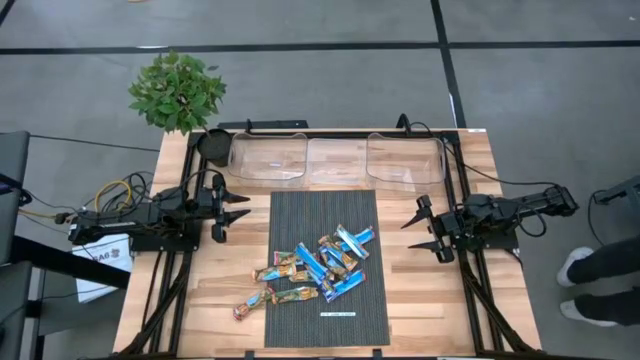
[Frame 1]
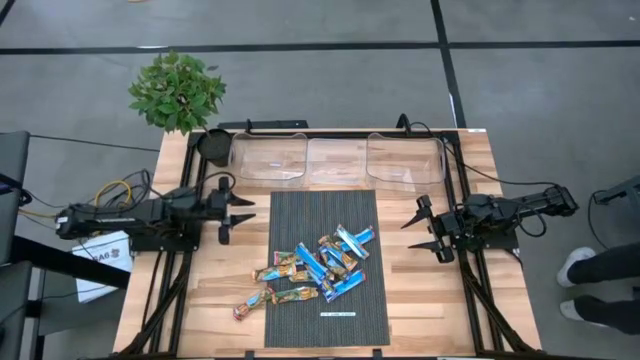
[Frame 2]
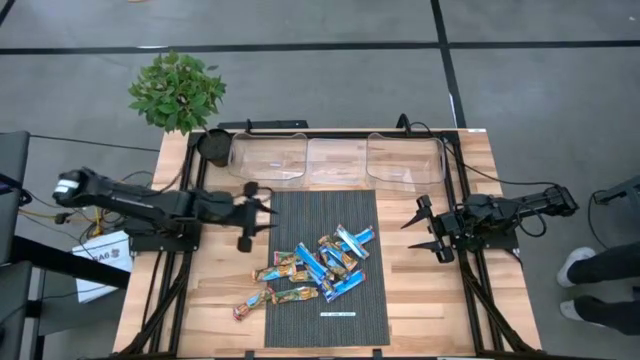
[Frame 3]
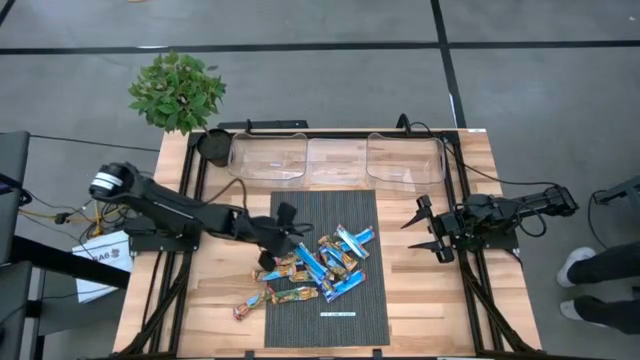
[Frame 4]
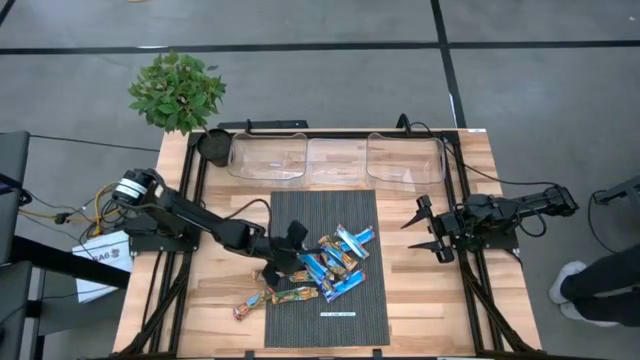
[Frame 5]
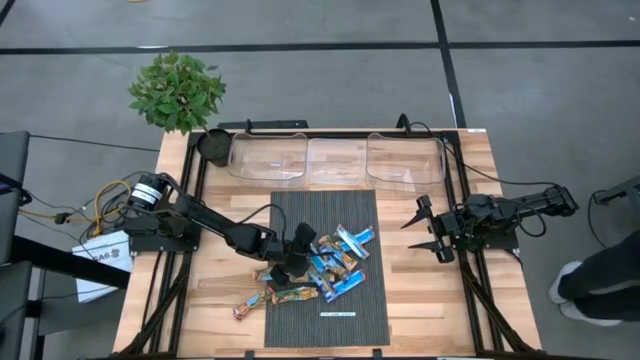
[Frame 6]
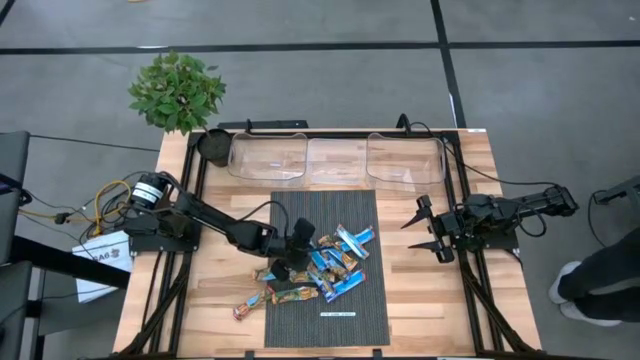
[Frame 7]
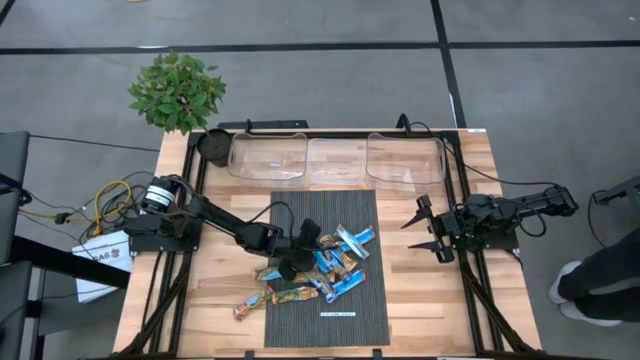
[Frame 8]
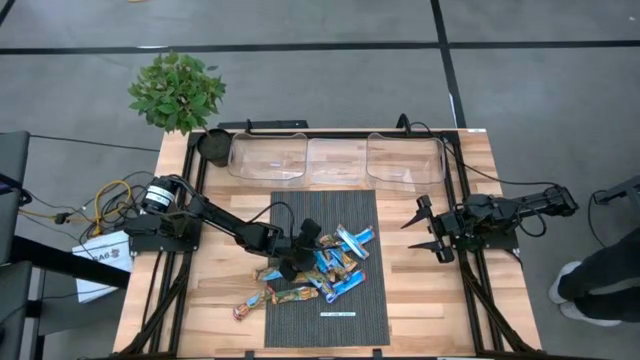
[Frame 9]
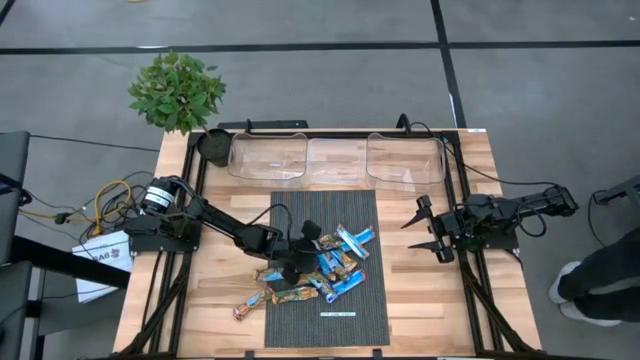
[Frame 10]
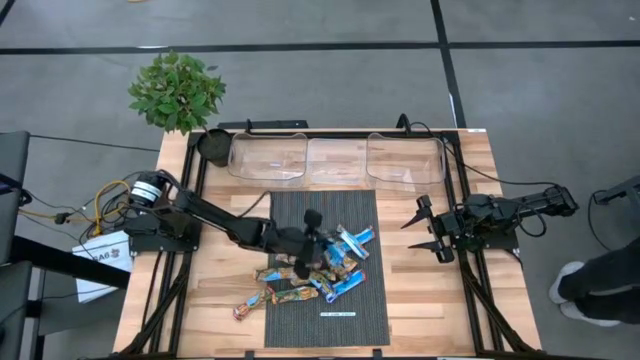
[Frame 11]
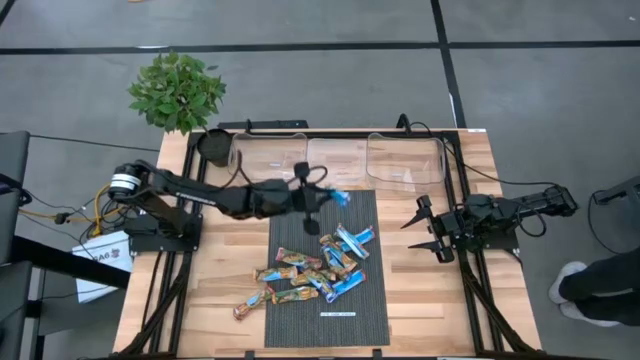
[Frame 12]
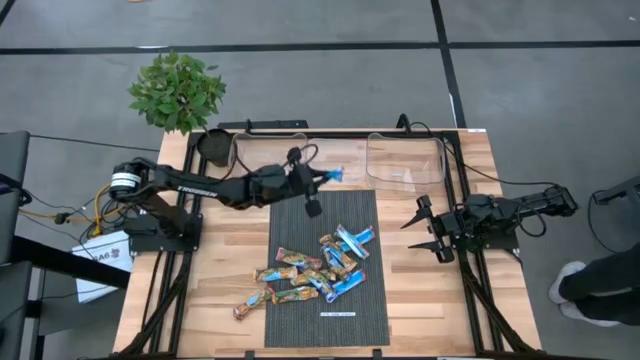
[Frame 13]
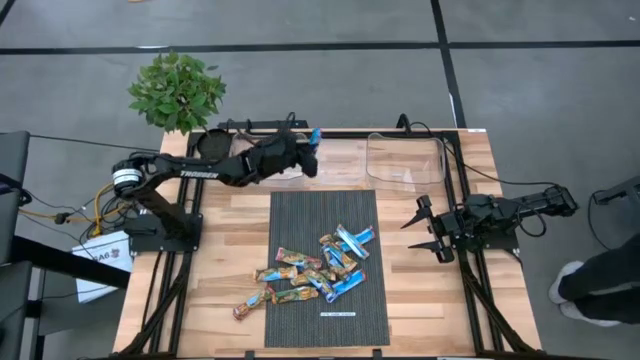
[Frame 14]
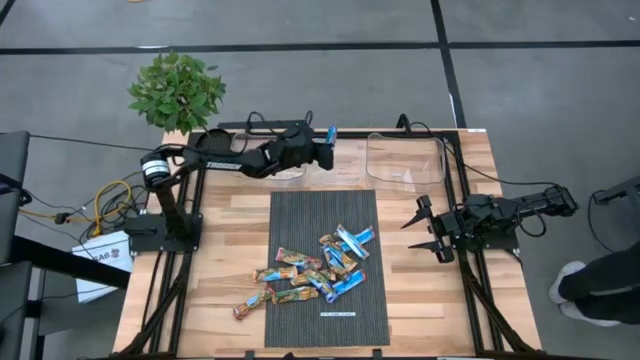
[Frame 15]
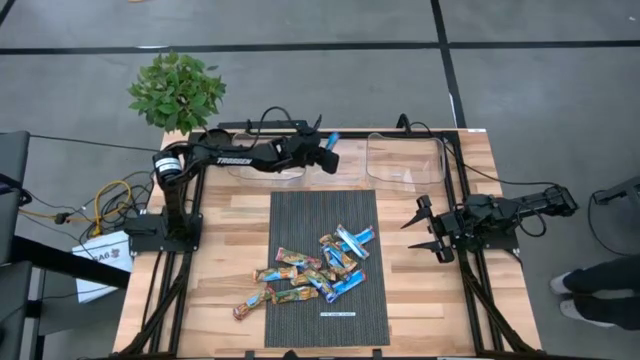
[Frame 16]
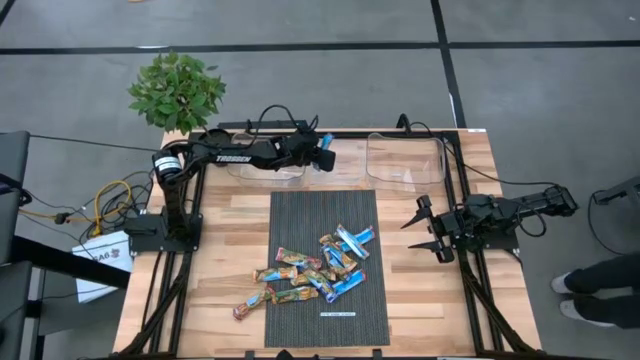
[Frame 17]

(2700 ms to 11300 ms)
Task: Pick and place Granola Bars by type
Put the blue granola bar into the white bin

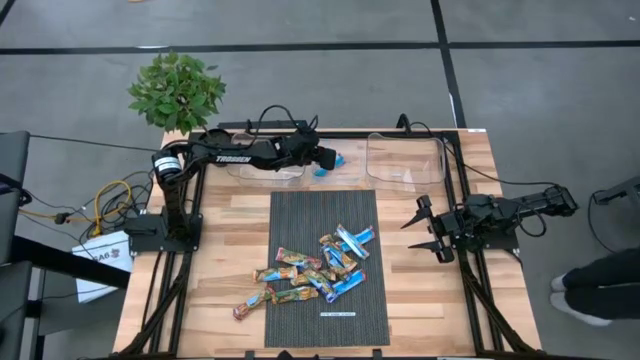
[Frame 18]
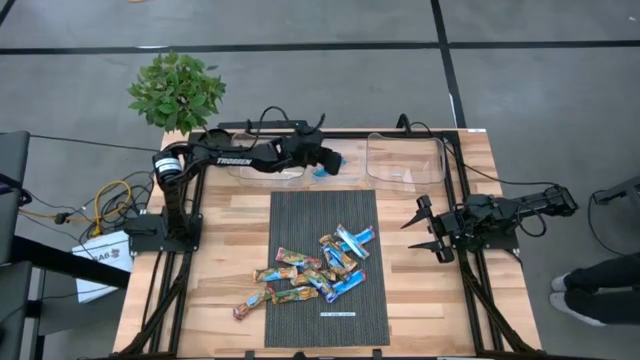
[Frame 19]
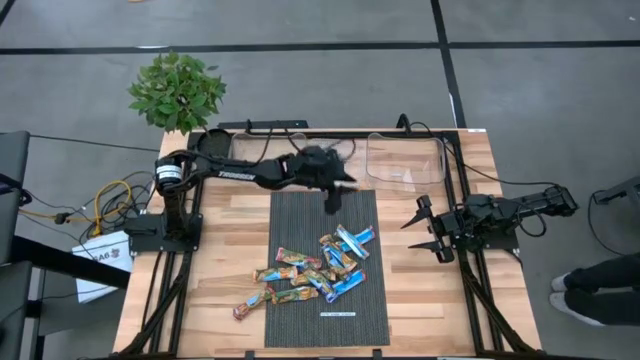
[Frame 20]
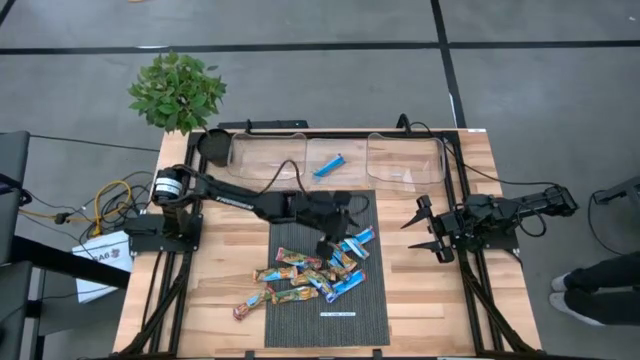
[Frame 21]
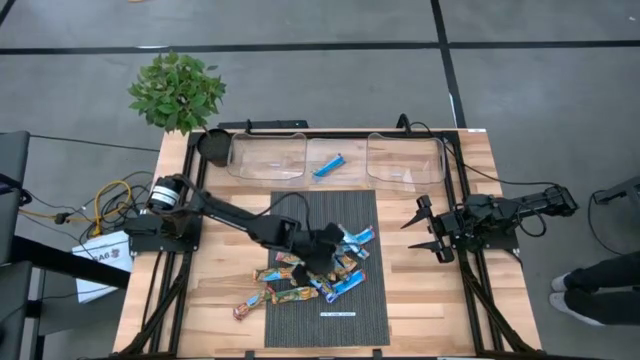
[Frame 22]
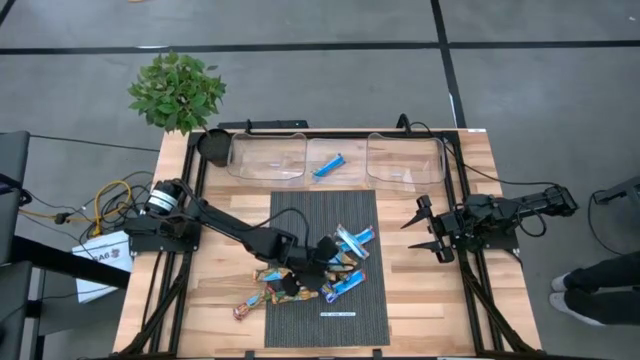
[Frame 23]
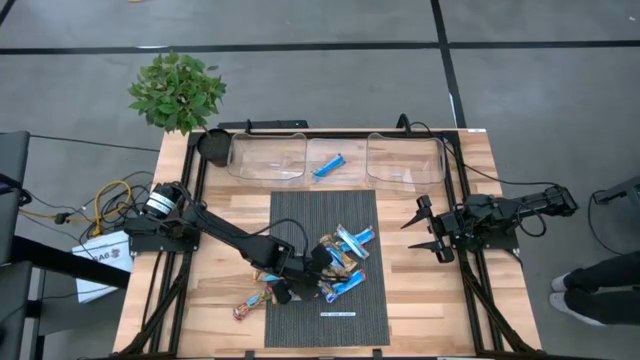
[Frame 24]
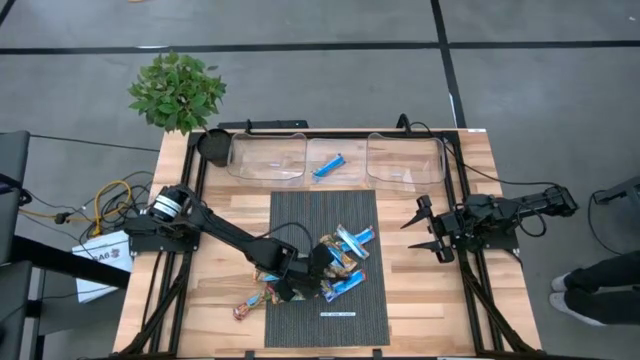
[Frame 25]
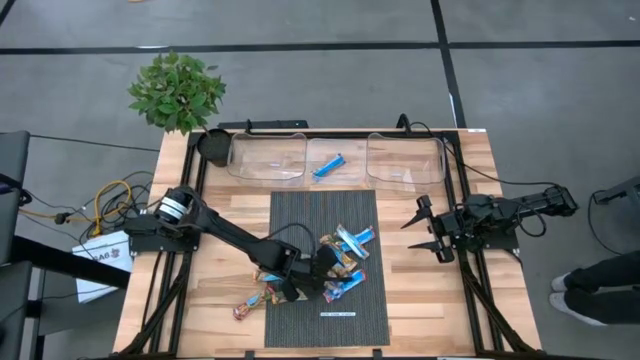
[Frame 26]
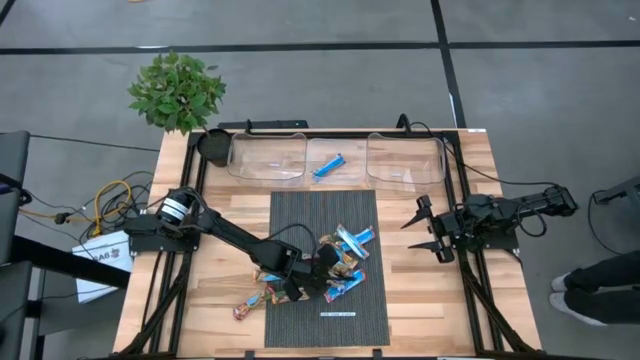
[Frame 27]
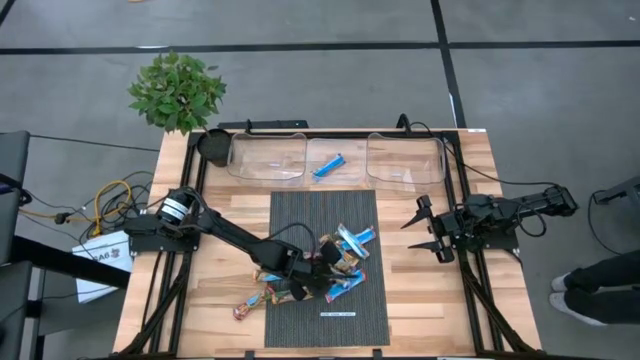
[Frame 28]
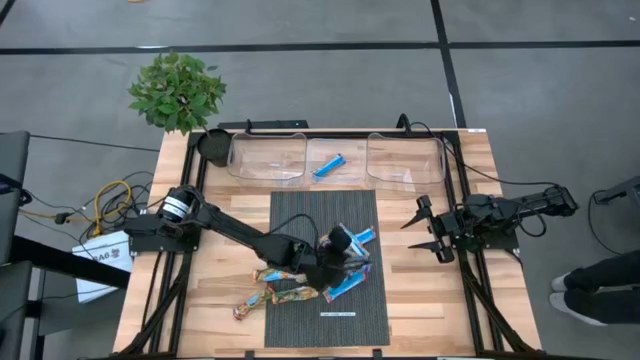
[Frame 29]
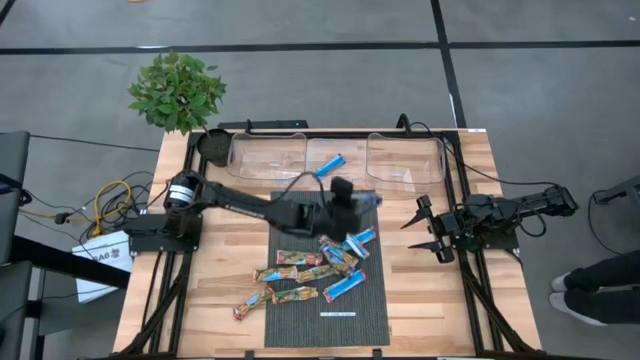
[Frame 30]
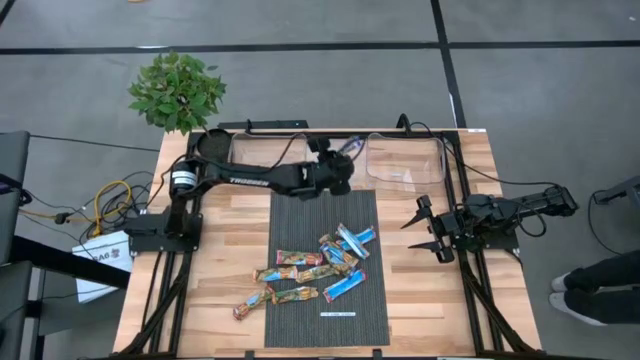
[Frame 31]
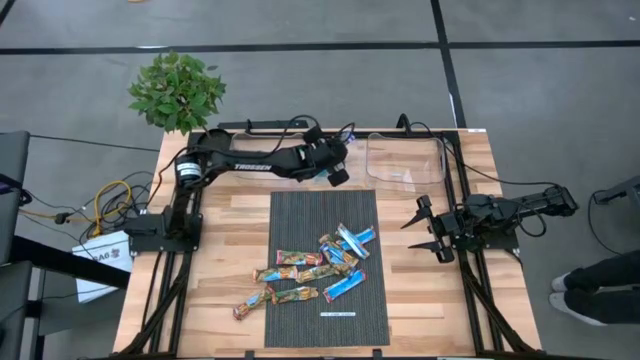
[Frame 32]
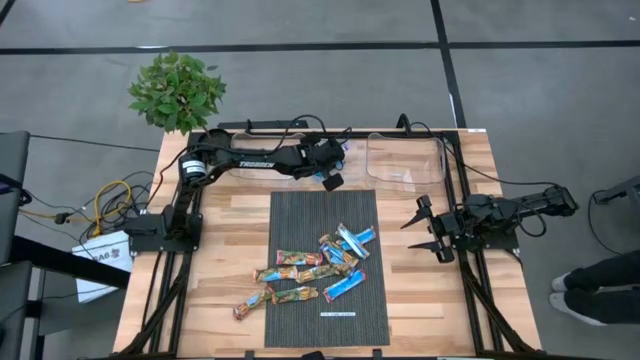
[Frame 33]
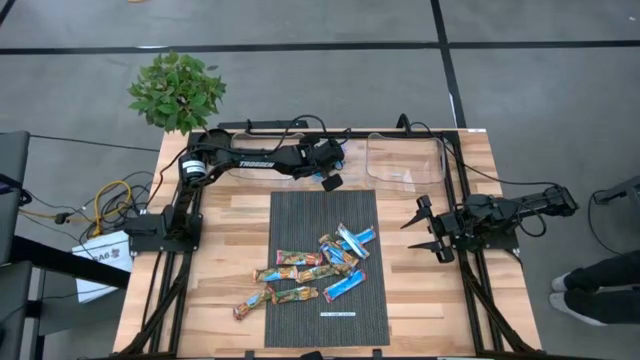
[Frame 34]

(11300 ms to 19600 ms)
Put the blue granola bar into the white bin

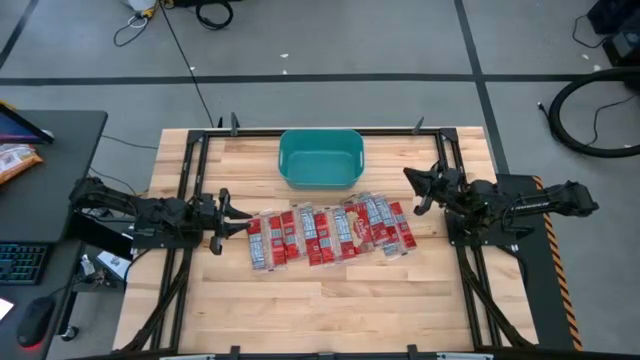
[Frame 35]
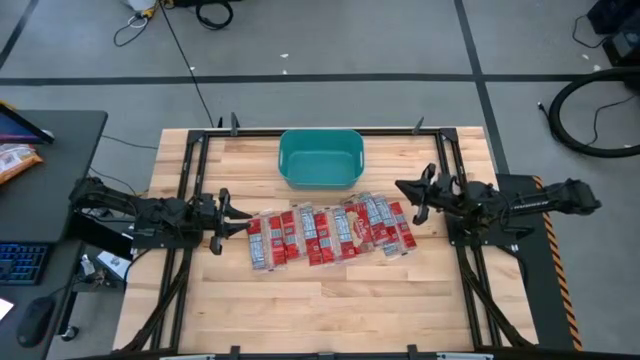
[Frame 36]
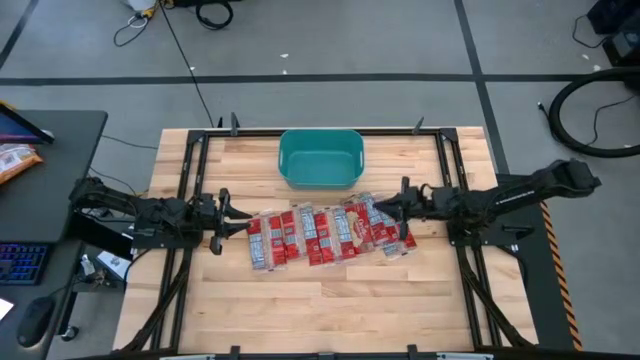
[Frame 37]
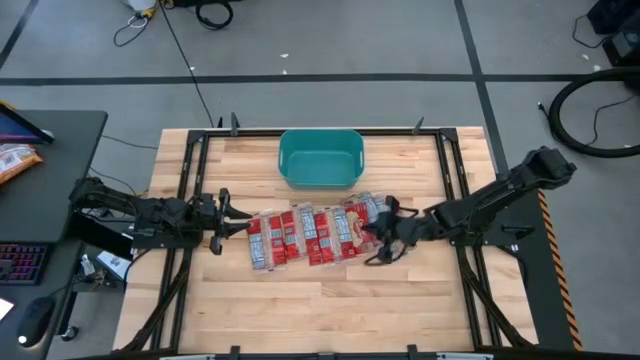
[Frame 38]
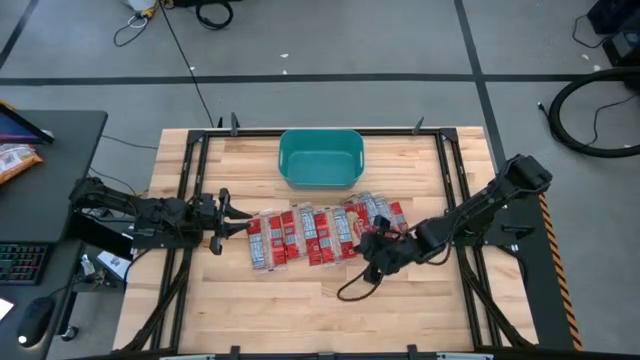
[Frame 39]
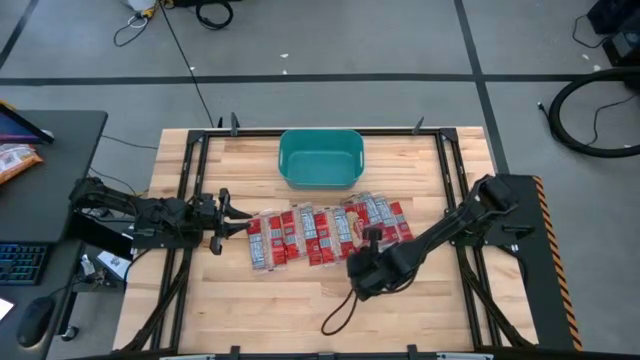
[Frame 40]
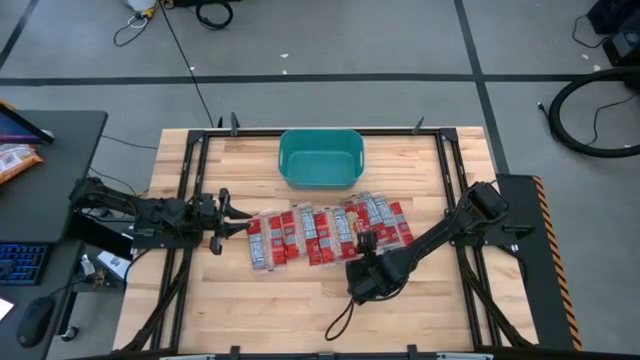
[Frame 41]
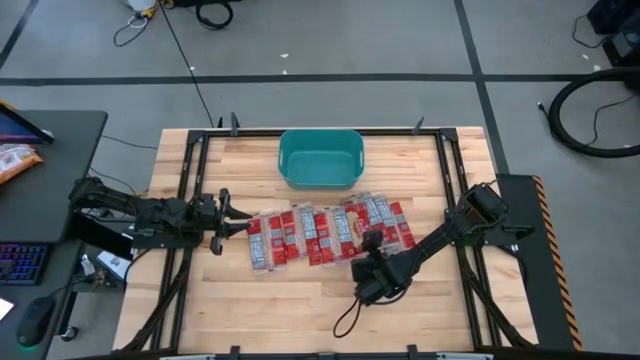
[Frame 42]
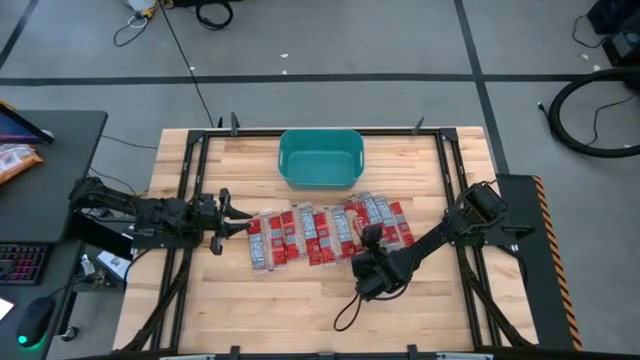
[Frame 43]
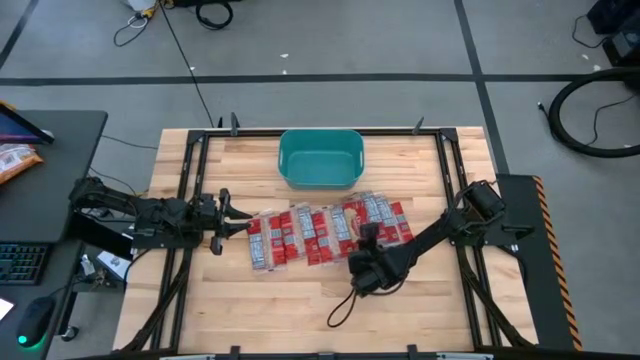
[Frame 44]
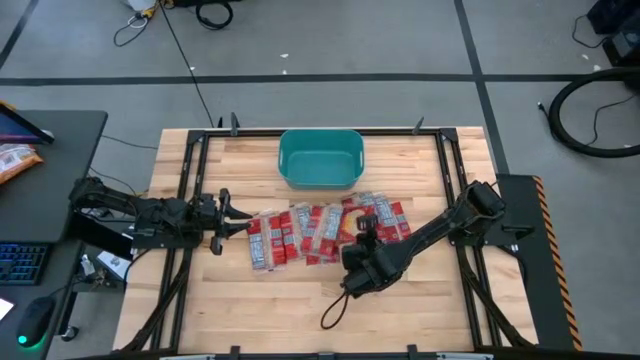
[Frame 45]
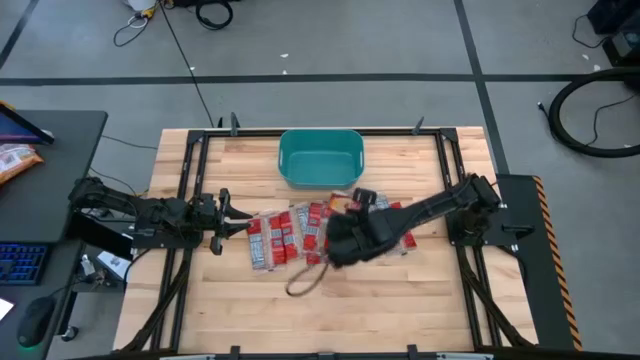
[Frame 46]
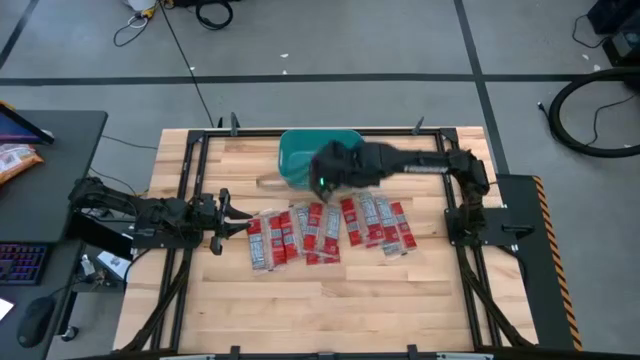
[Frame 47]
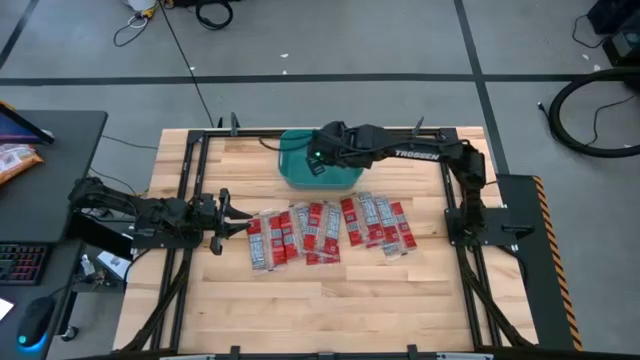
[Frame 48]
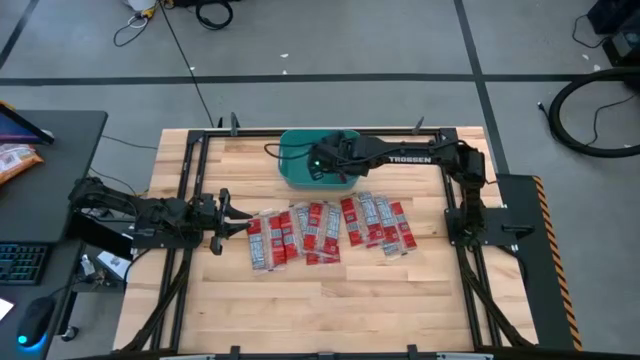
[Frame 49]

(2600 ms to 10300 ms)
Task: Sort popcorn bags into baskets
Put the red popcorn bag into the blue bin
